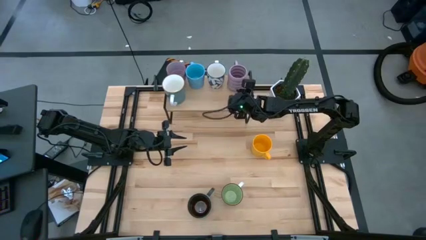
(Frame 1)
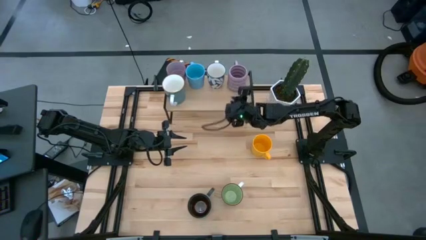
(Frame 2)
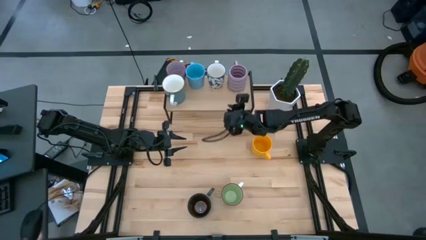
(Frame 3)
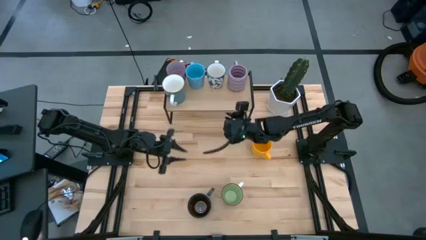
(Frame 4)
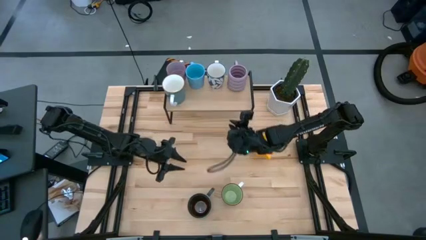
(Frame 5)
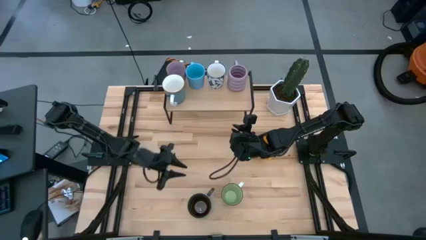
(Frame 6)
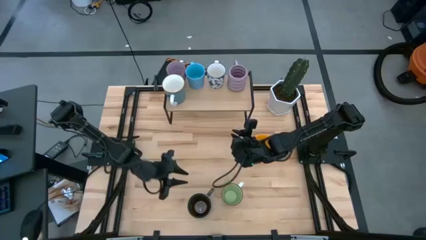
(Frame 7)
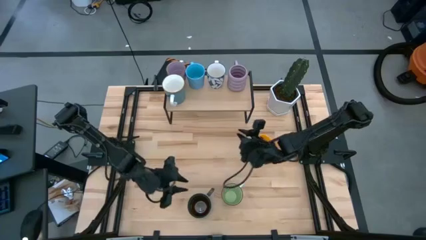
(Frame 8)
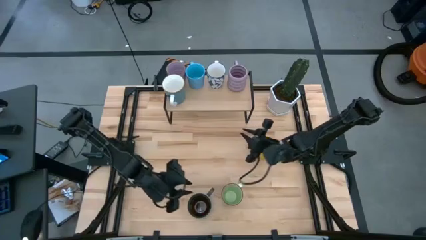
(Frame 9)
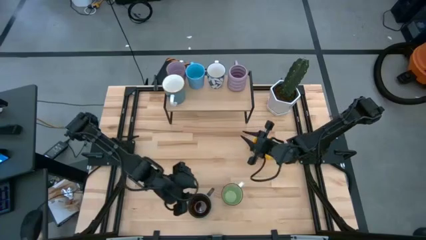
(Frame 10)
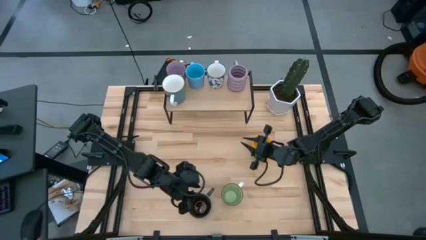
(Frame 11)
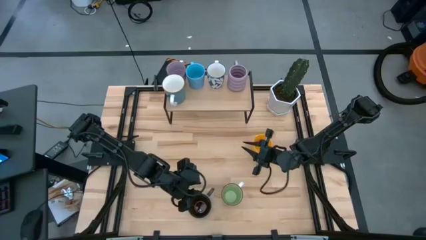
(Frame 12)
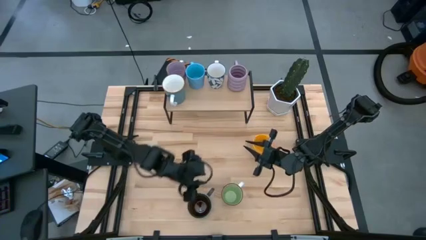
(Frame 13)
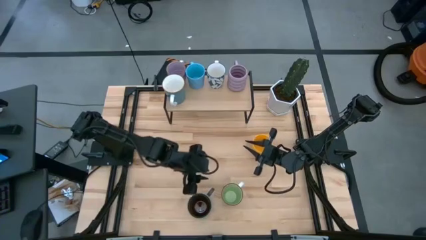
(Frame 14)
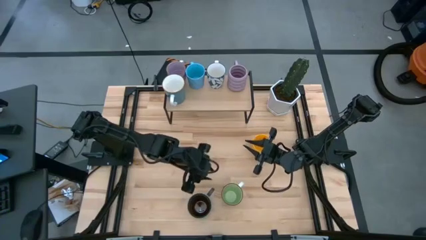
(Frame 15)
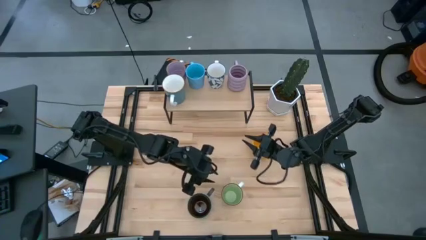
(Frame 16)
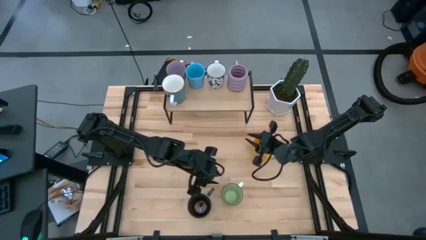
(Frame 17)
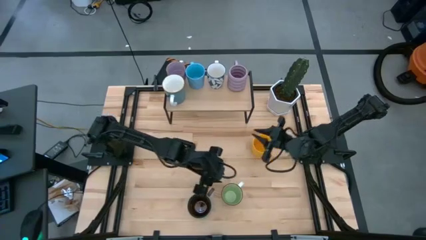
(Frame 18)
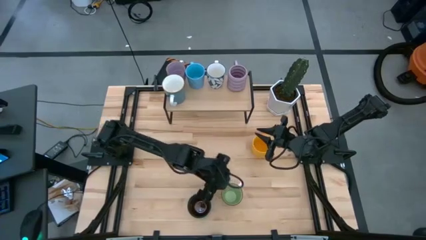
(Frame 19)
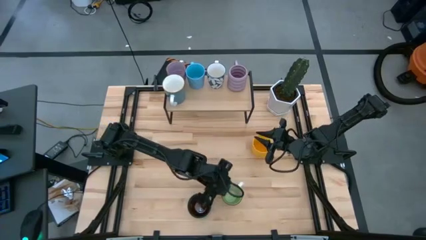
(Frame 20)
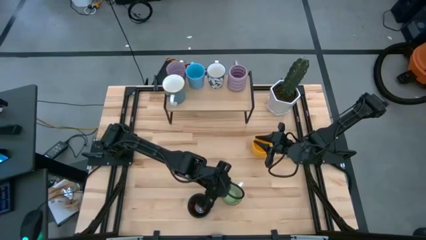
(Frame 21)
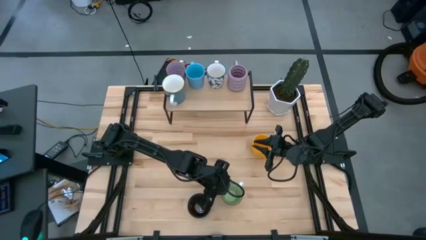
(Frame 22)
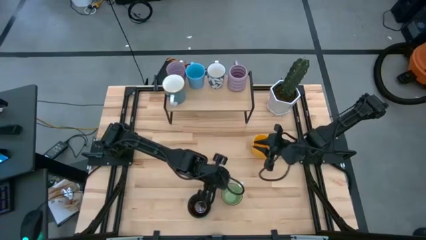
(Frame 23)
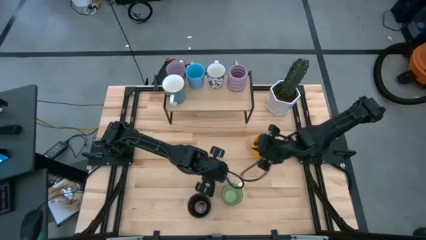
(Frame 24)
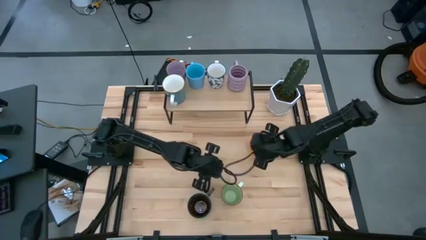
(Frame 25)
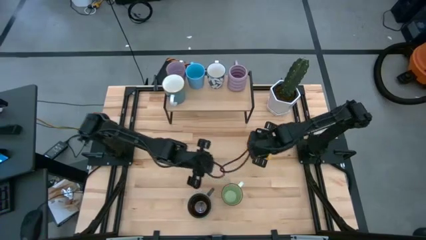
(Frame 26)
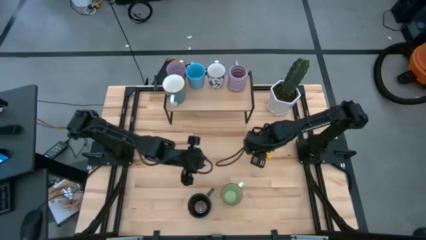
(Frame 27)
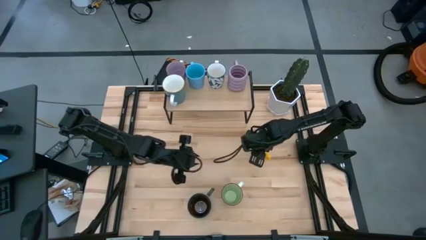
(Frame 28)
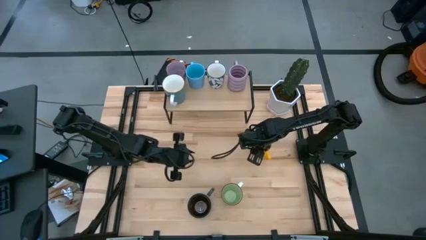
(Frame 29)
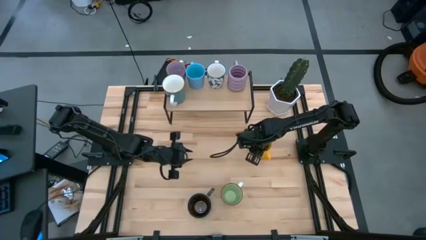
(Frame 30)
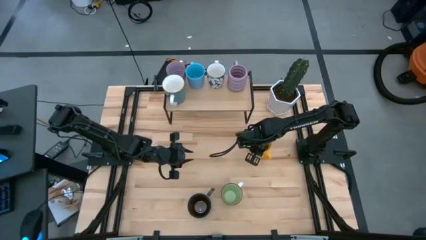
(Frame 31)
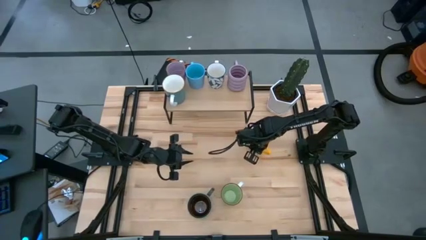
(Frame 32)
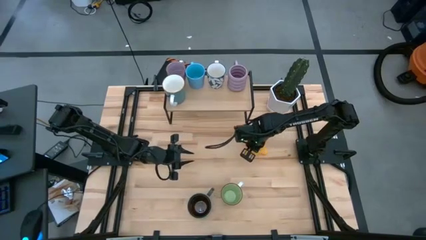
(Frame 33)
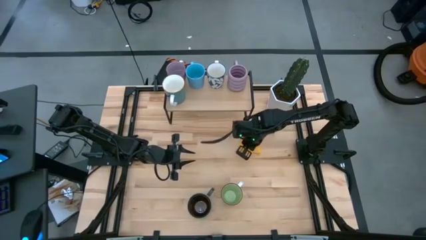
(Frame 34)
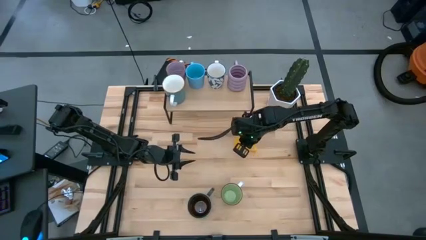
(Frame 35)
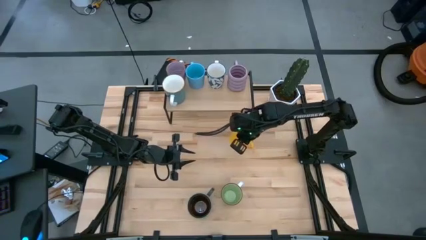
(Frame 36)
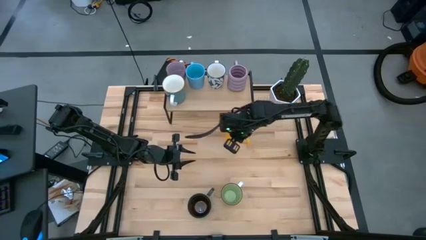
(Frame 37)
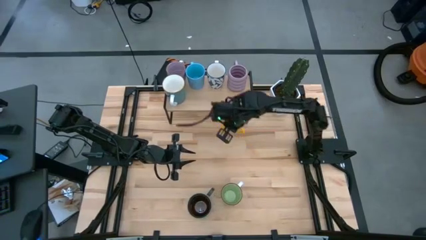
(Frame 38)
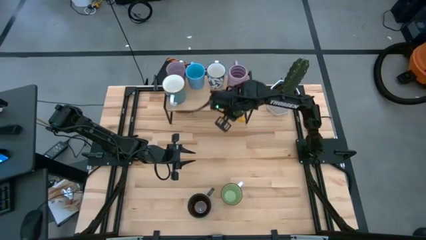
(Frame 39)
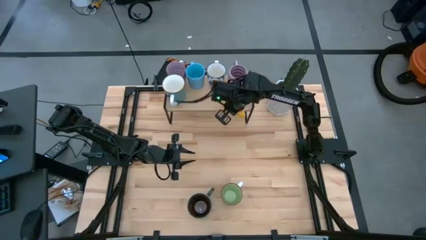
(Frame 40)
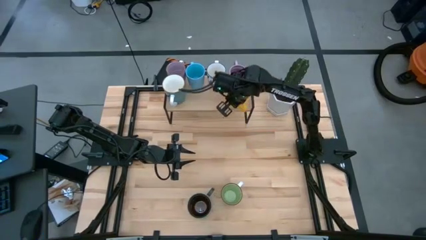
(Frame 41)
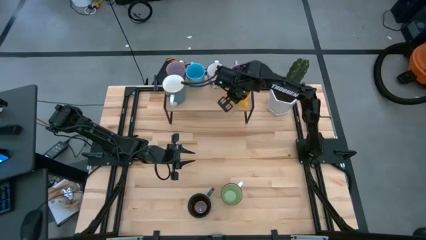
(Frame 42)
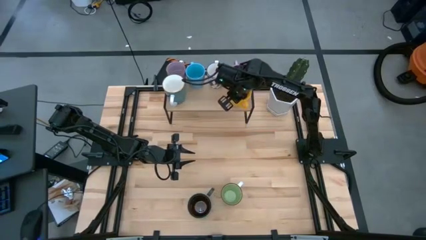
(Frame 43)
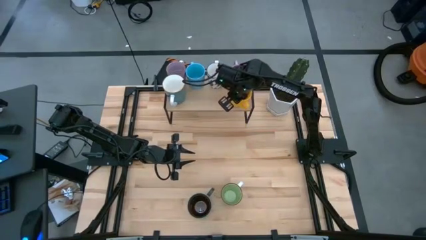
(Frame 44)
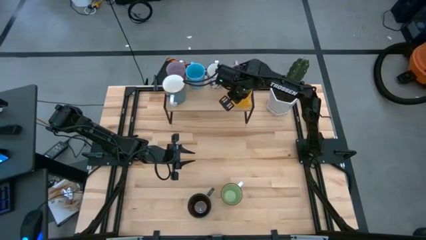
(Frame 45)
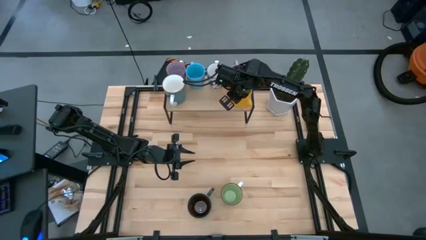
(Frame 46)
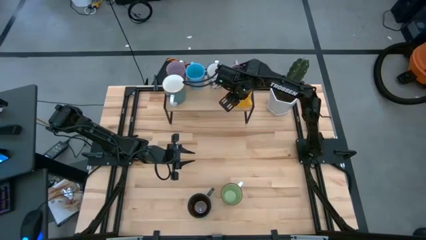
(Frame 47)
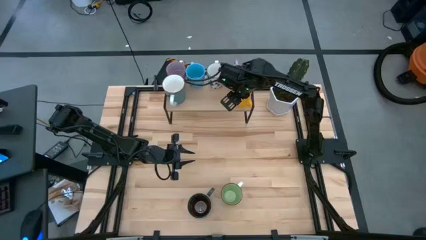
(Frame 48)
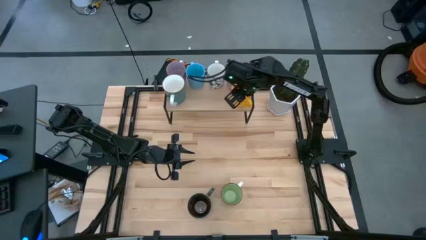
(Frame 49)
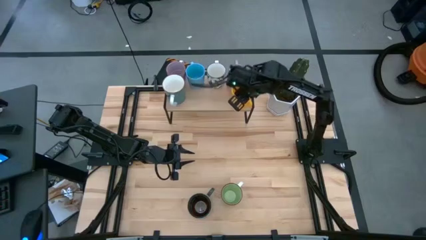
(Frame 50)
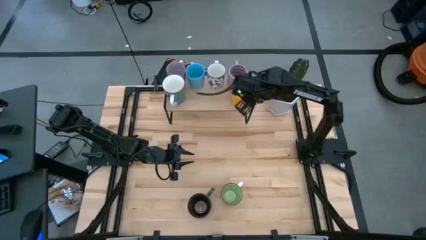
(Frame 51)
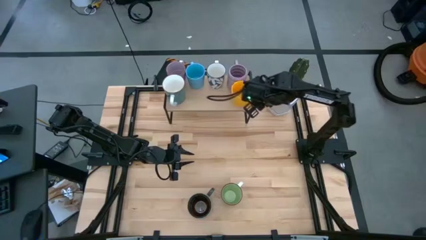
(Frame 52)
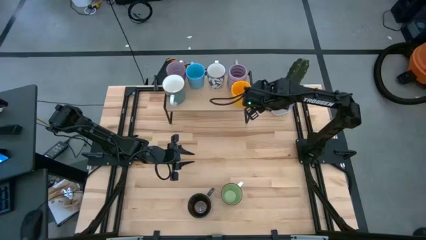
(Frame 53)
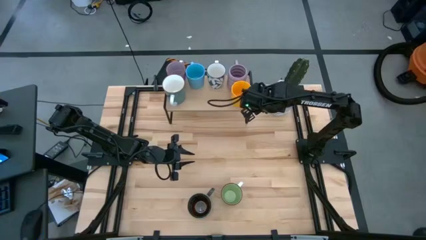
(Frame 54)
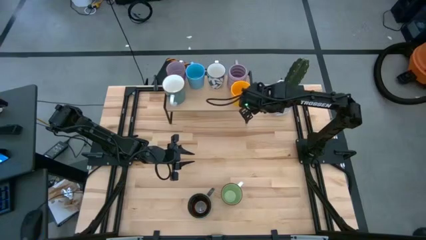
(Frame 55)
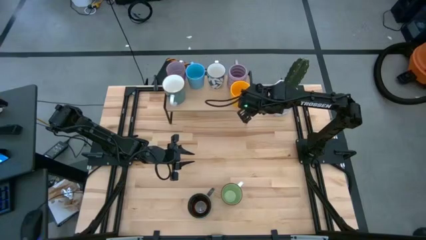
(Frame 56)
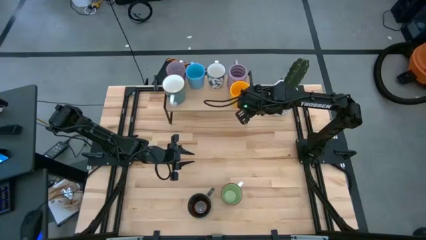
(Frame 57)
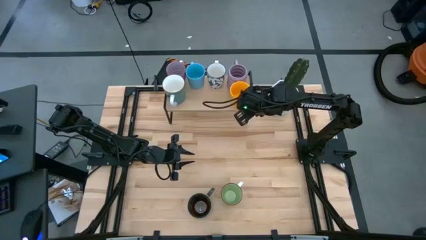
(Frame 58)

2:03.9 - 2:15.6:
Task: Place coffee mugs
Put the yellow mug on the shelf

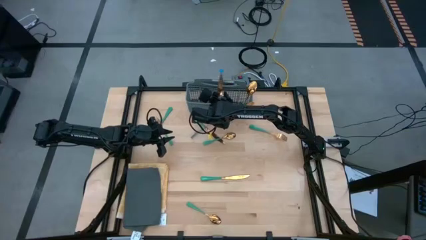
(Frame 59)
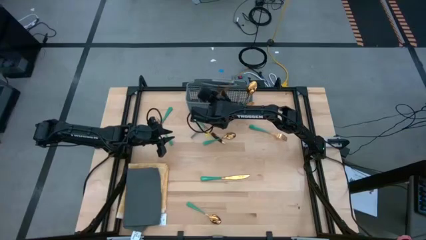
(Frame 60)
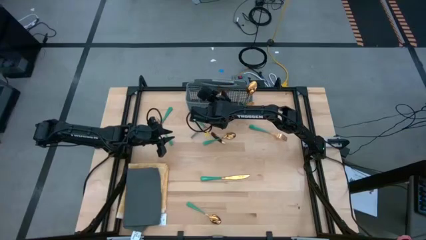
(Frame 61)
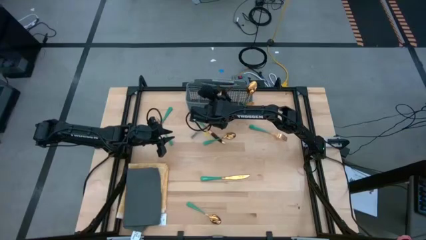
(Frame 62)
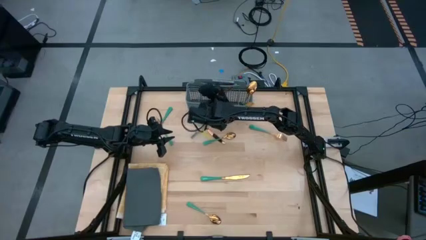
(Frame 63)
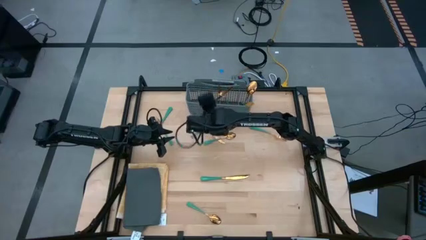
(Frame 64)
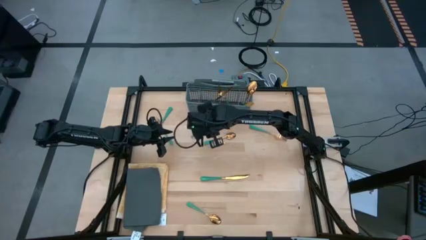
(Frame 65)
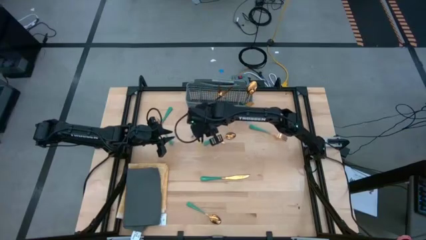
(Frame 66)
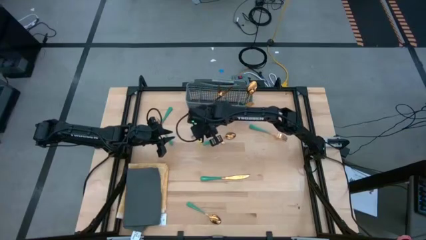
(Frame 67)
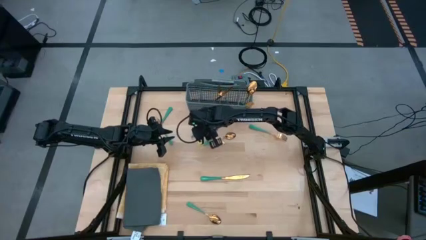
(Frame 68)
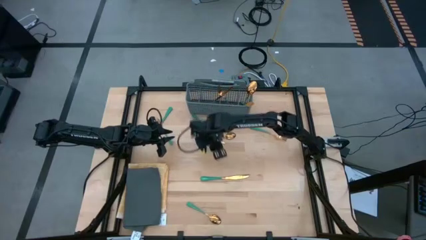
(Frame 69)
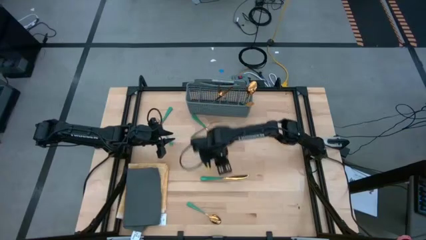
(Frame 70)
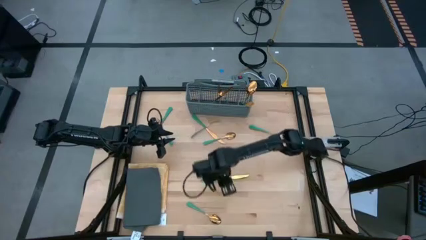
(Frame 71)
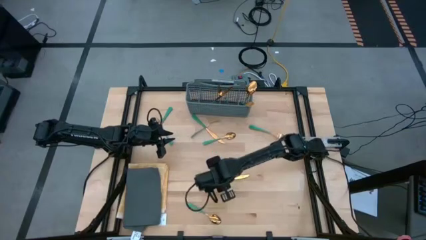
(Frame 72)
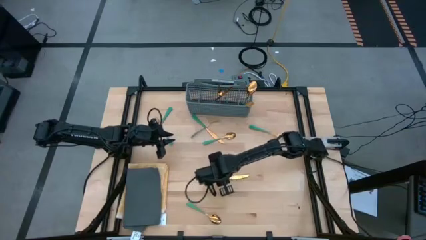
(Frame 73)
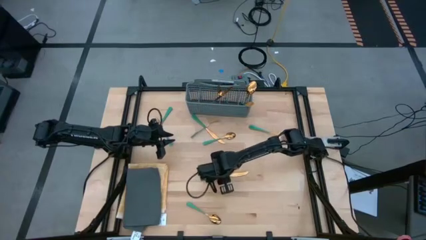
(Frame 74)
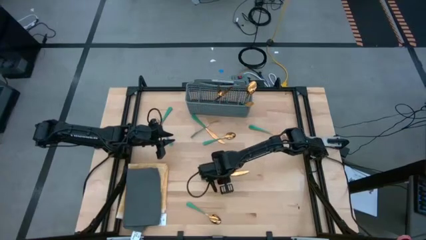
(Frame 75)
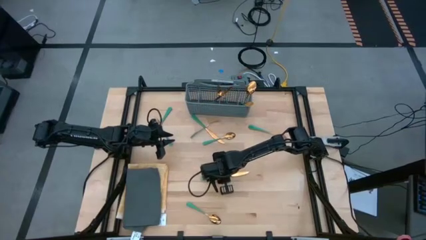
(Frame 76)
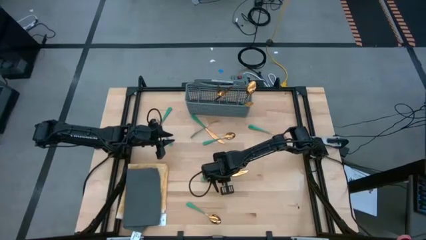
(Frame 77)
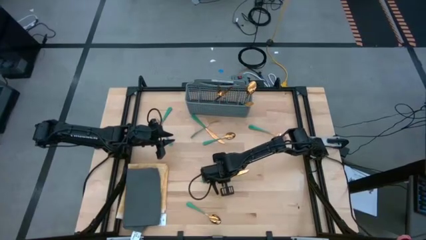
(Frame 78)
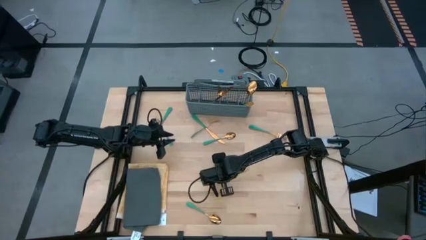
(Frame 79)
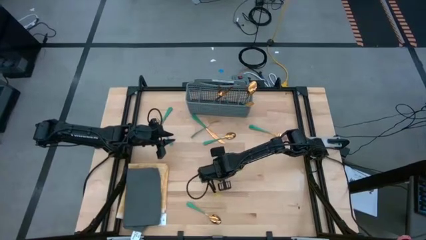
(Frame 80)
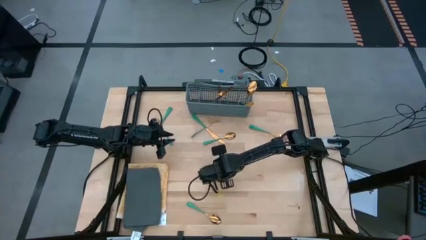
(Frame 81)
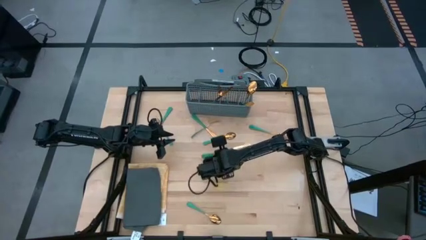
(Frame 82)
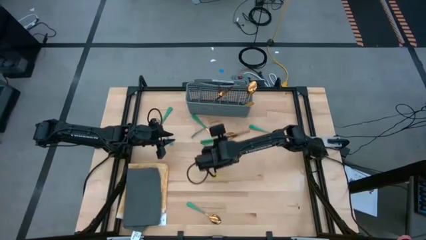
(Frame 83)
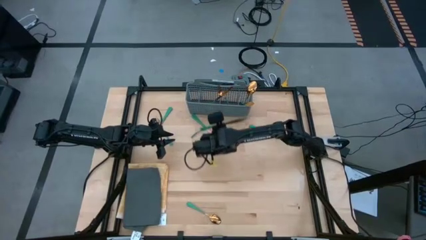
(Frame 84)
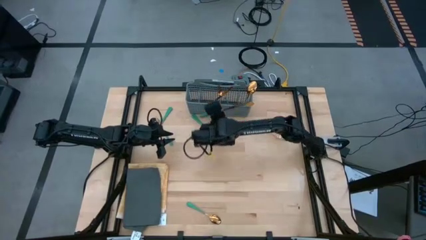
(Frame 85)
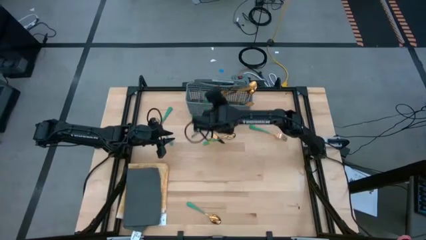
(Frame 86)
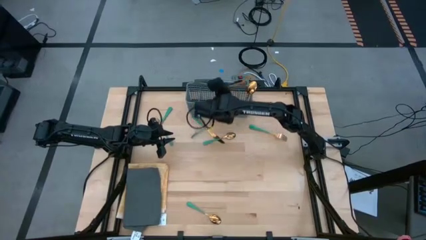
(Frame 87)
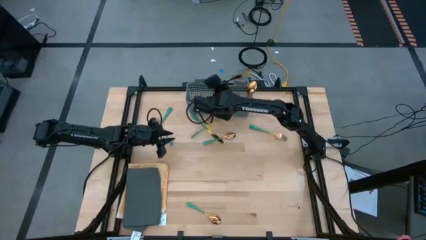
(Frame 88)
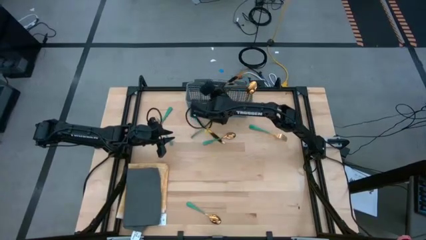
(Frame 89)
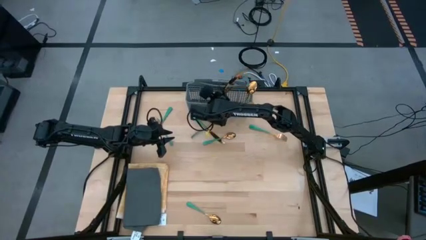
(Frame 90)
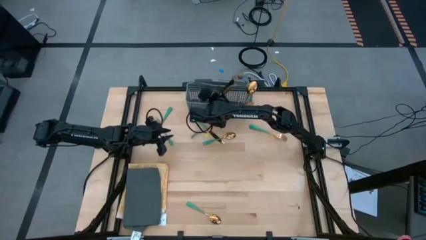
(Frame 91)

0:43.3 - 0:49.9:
Task: Sort silverware
Put the green knife into the dishwasher utensil holder
